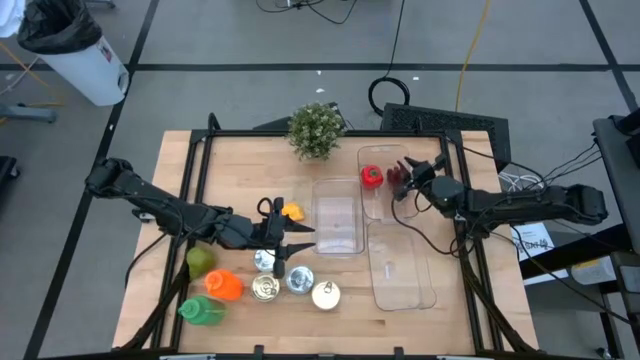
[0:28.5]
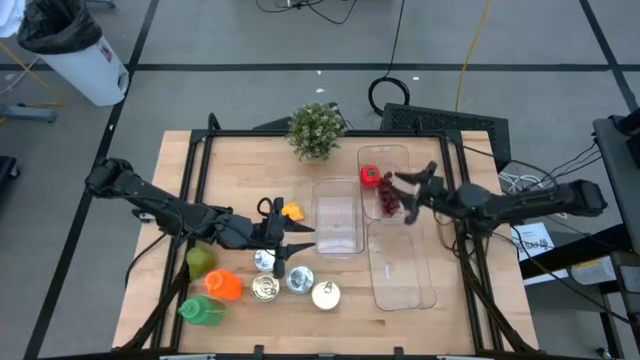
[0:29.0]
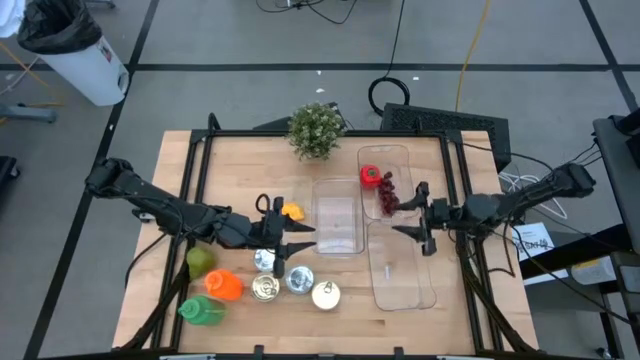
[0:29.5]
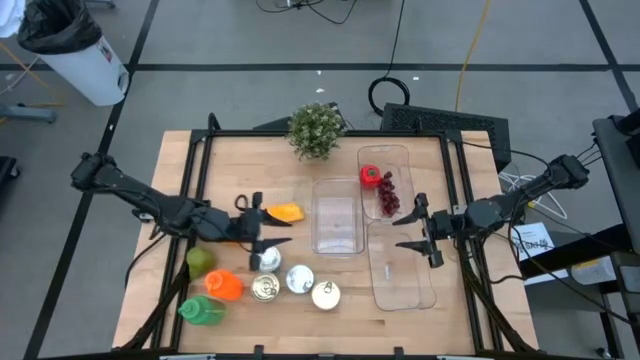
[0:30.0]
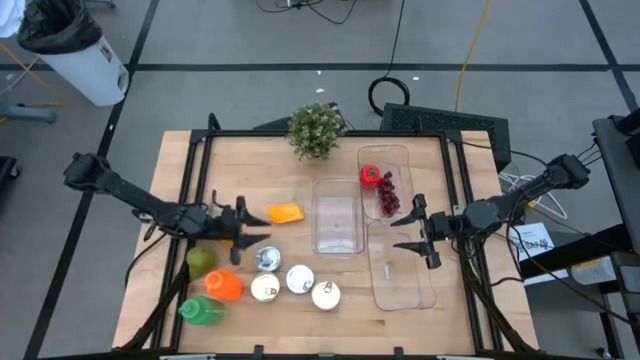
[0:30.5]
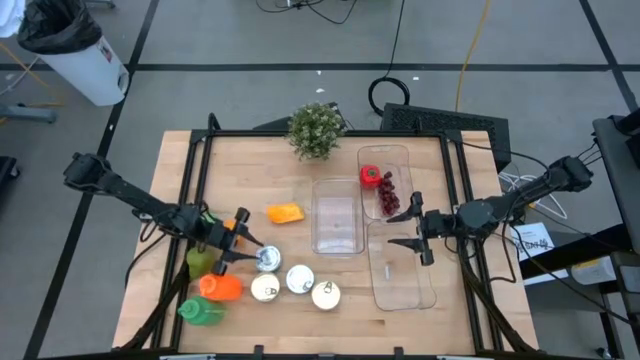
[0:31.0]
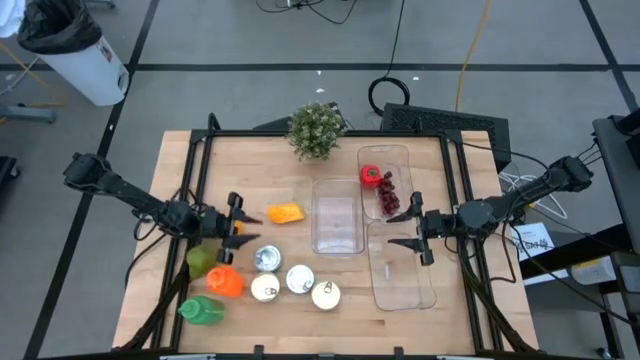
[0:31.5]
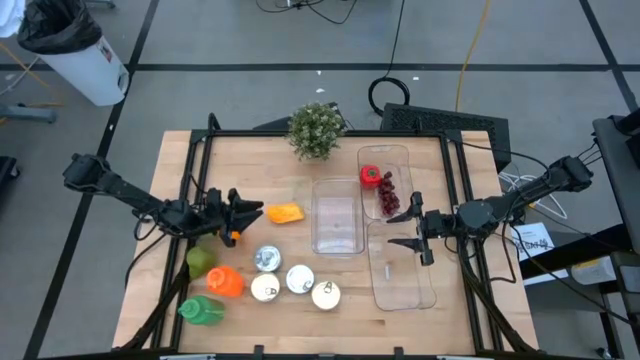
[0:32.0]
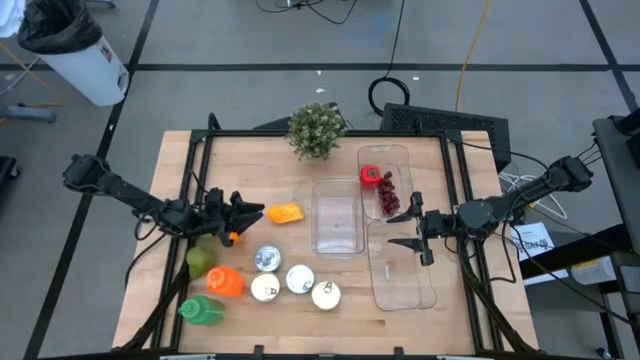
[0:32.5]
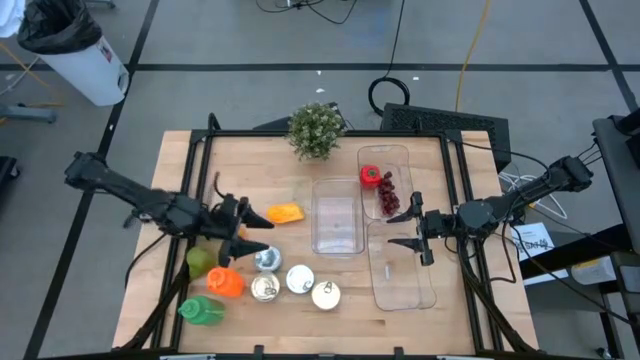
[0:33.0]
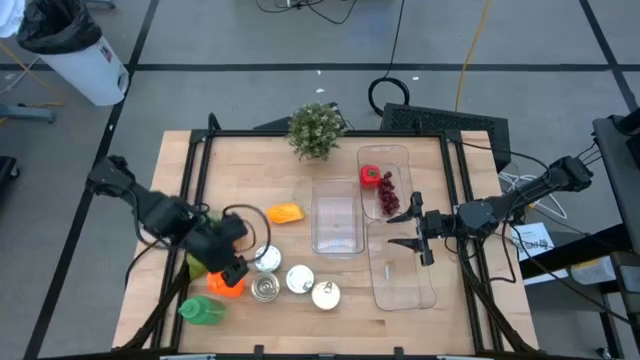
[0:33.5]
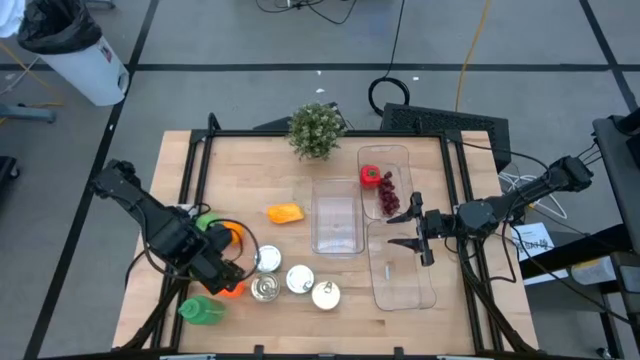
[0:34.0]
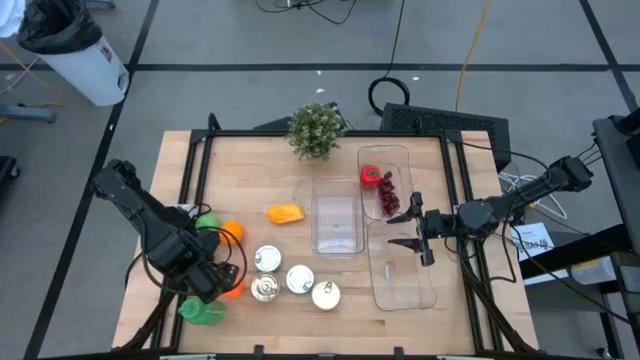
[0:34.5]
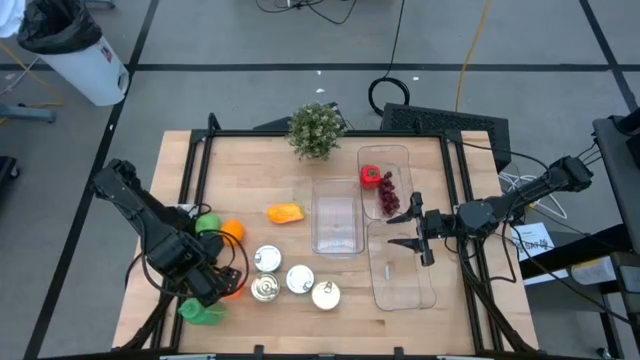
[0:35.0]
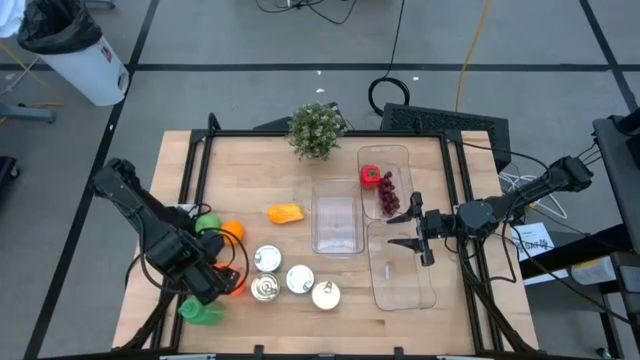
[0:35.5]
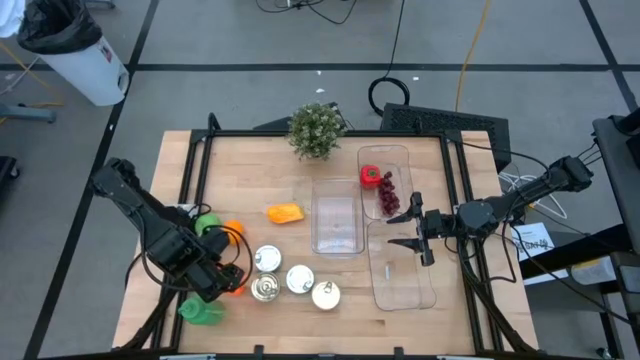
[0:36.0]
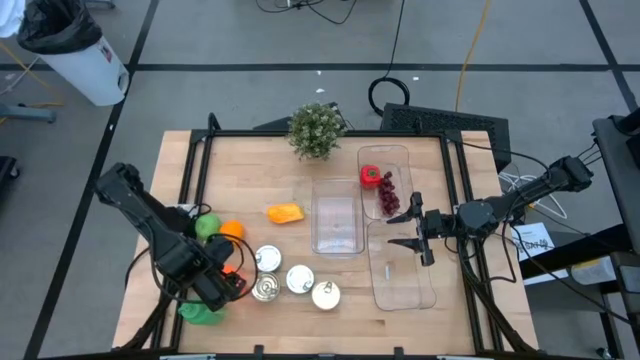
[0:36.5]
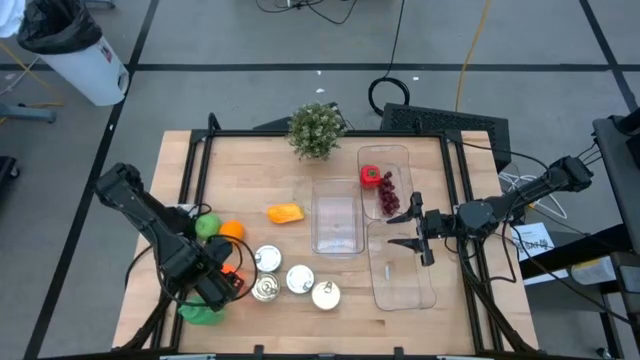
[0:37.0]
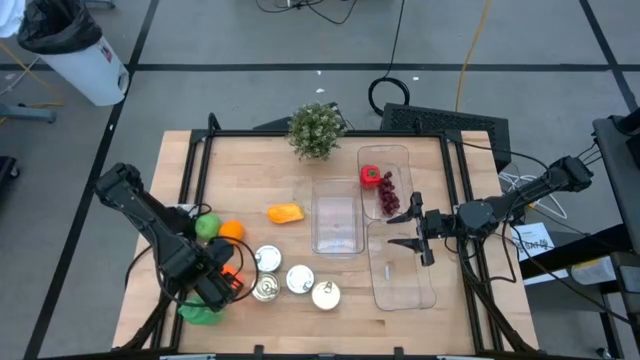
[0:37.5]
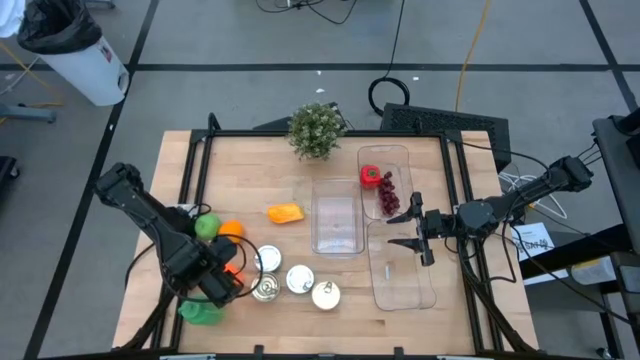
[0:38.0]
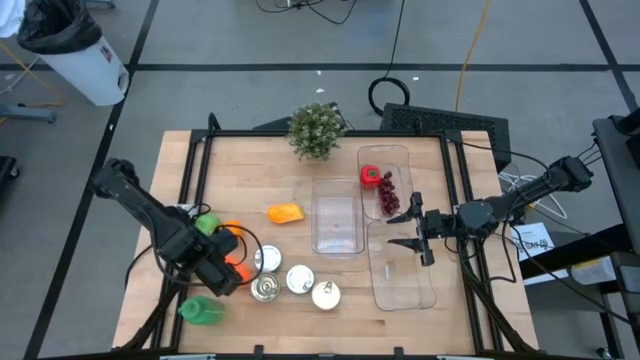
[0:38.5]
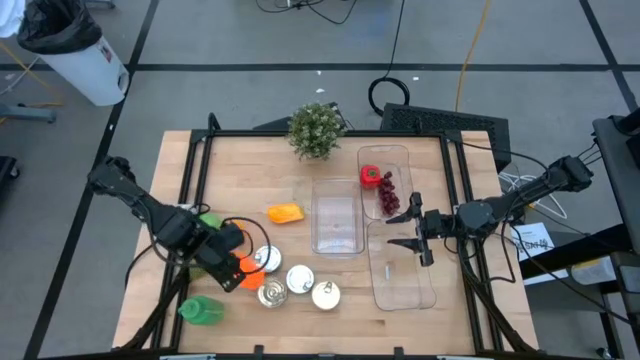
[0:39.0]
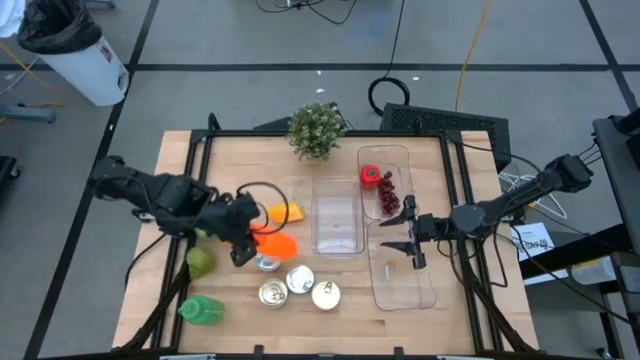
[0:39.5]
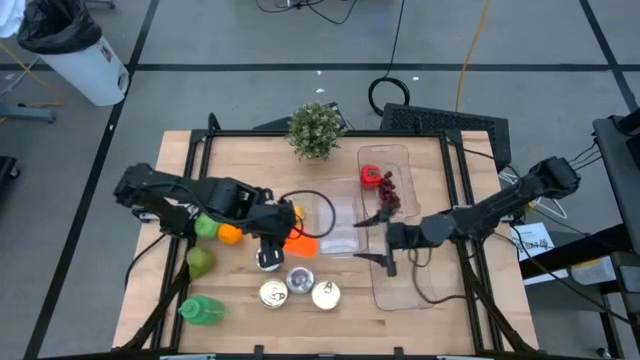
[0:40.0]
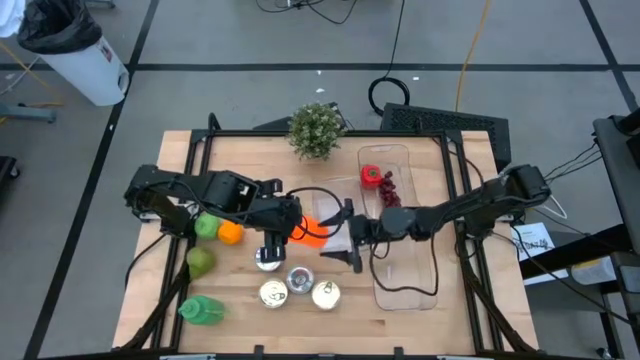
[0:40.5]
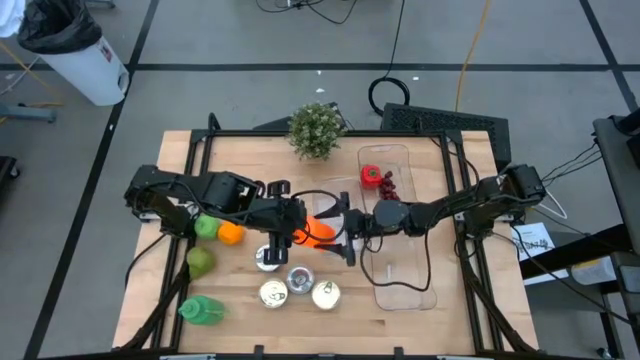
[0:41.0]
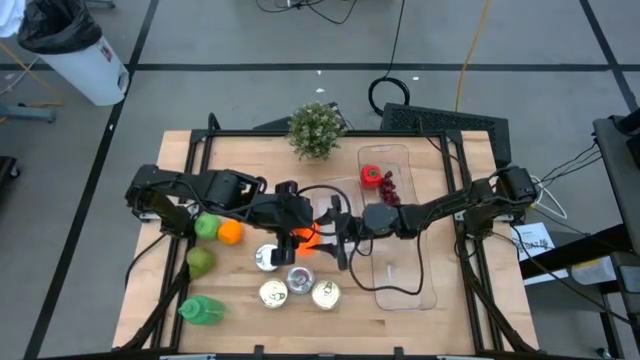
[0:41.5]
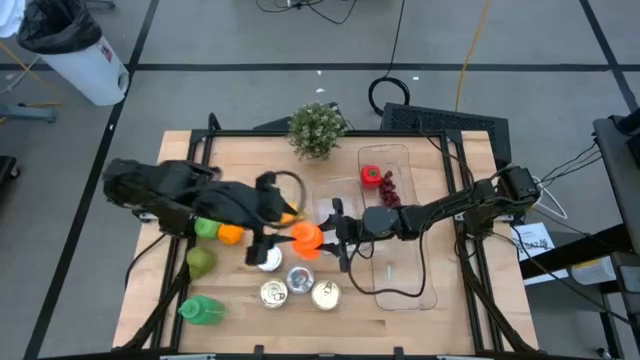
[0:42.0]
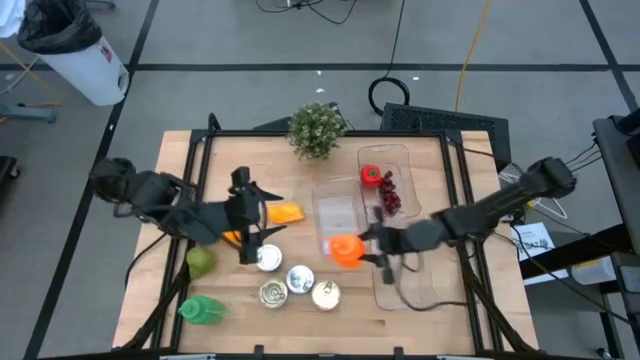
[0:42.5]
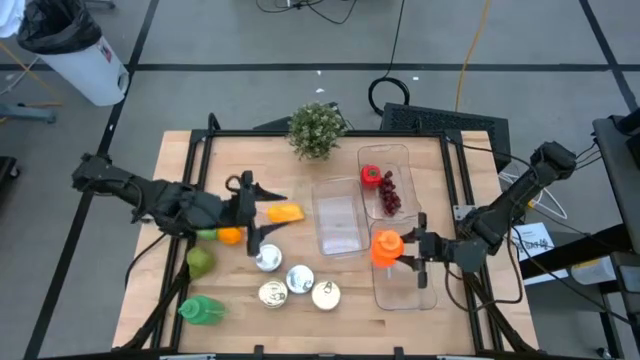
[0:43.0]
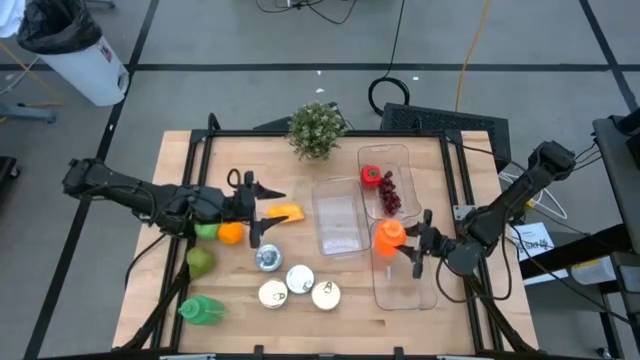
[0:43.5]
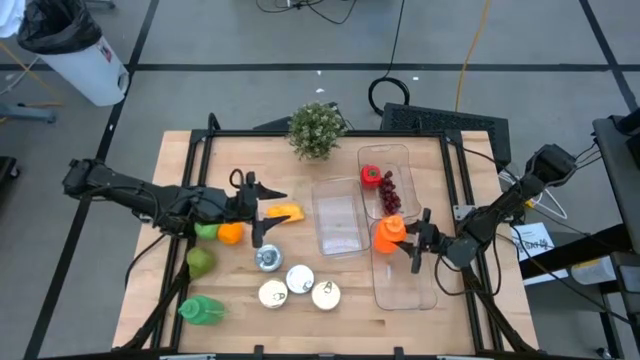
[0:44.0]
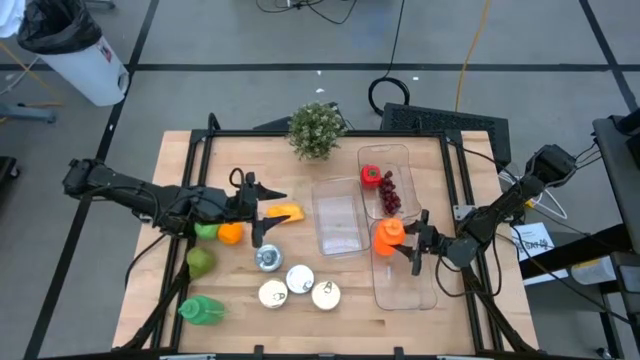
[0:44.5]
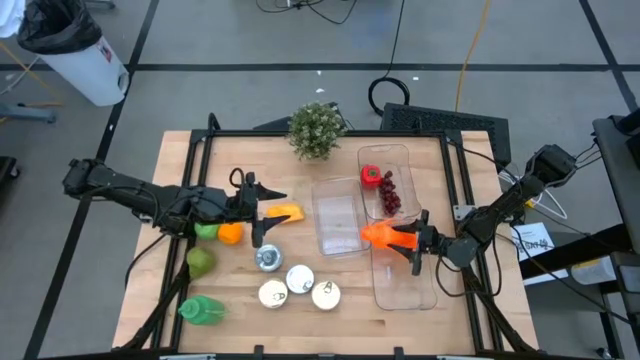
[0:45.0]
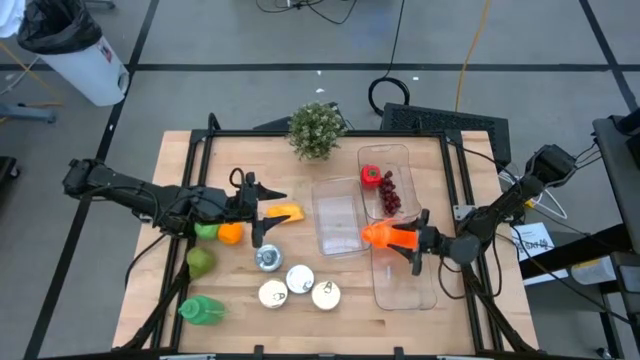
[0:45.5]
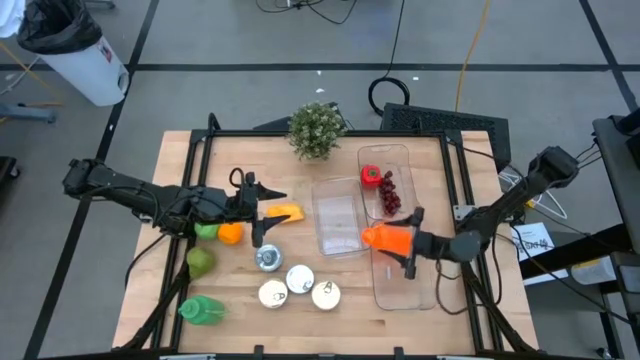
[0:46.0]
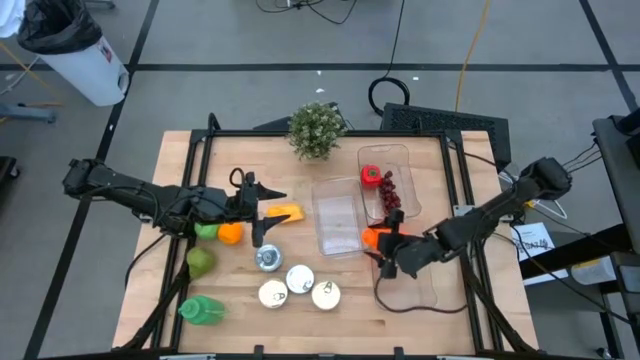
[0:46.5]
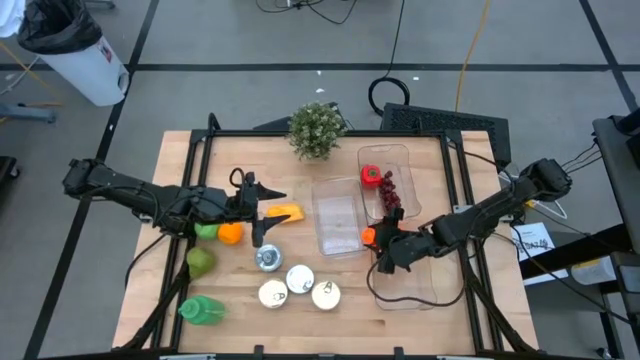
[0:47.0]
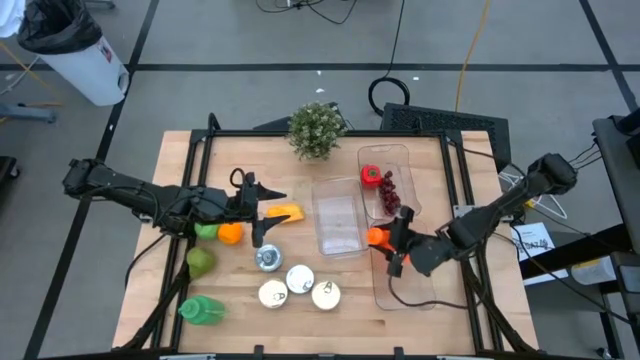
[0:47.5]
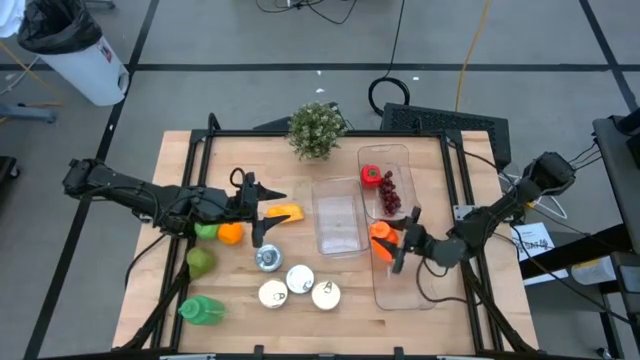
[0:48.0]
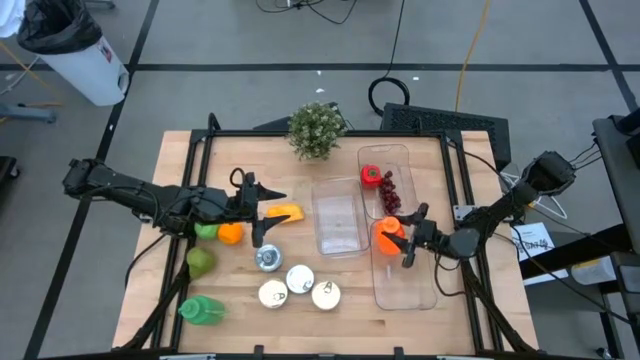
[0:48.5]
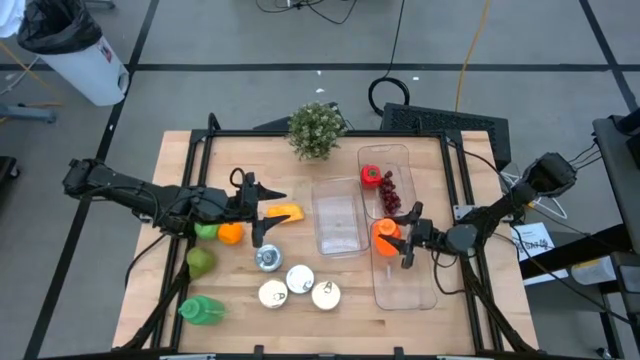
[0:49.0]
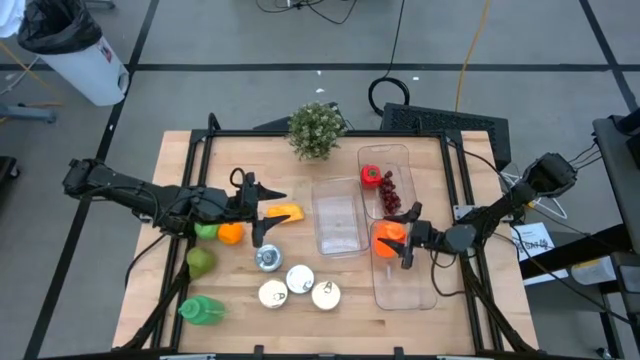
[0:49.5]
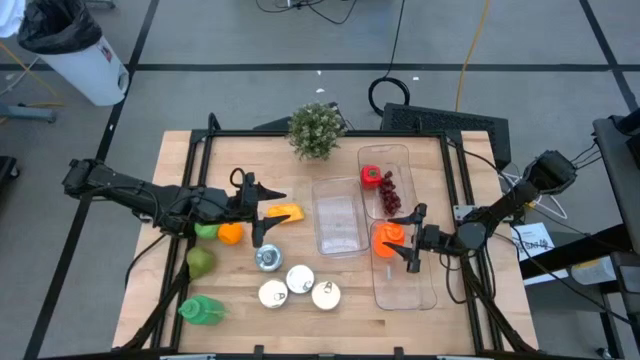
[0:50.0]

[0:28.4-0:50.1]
Task: Pick & Place Food Item
Put the orange water bottle into the bottom transparent bin
